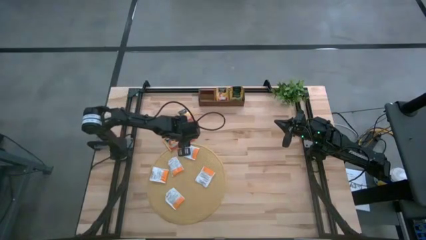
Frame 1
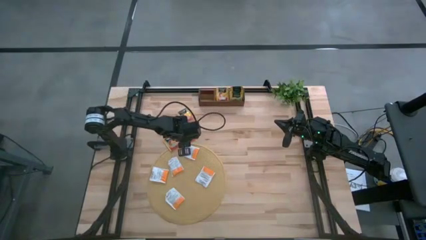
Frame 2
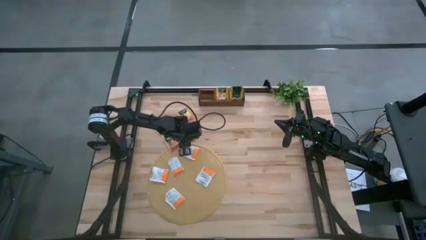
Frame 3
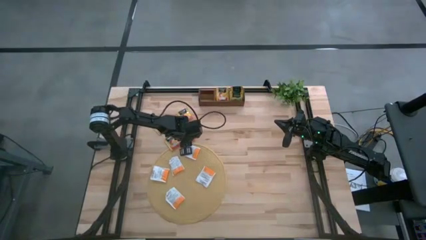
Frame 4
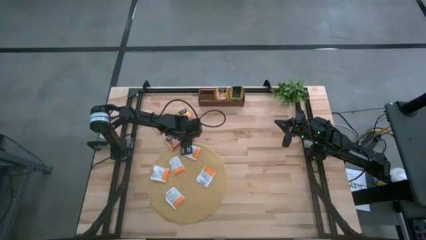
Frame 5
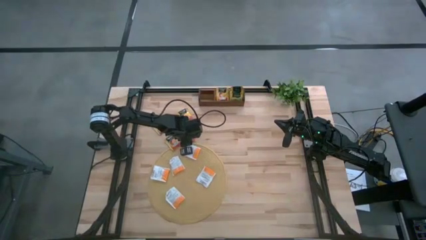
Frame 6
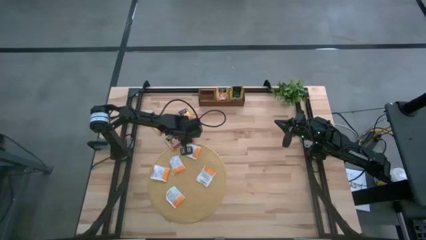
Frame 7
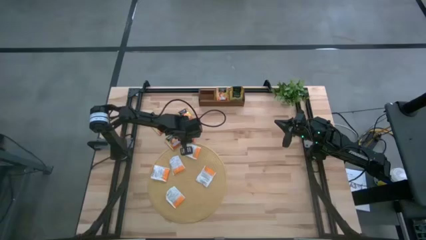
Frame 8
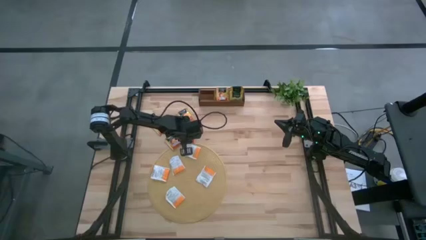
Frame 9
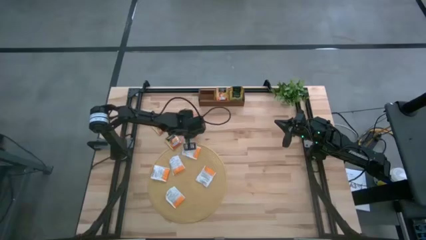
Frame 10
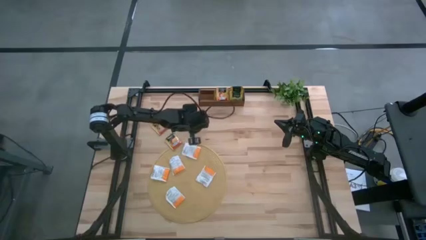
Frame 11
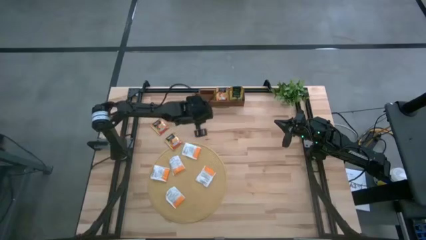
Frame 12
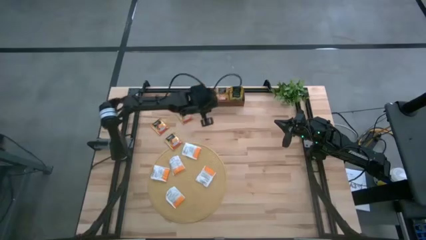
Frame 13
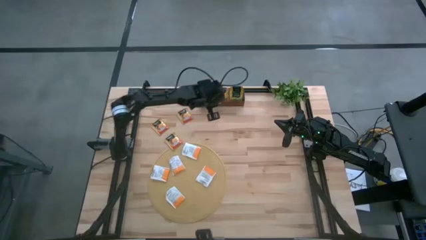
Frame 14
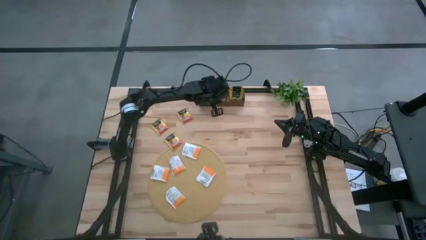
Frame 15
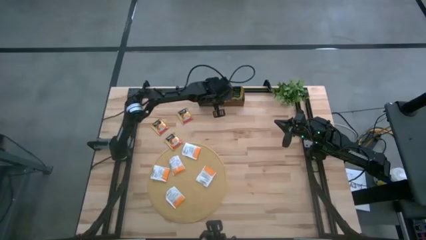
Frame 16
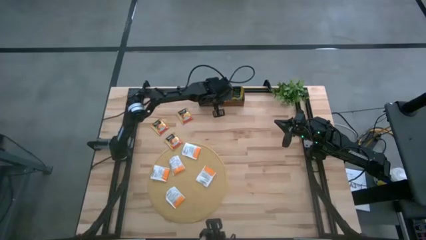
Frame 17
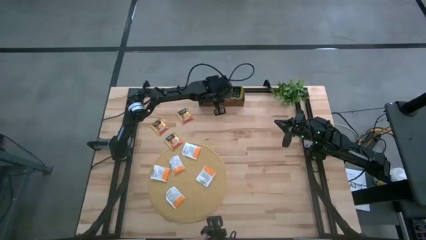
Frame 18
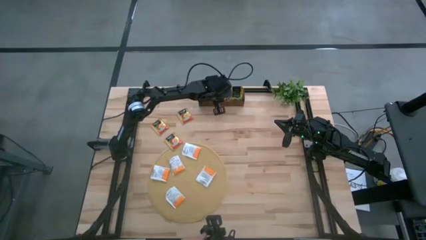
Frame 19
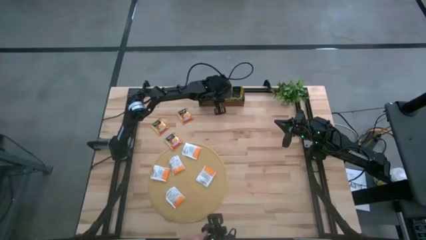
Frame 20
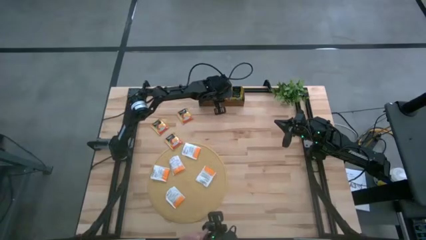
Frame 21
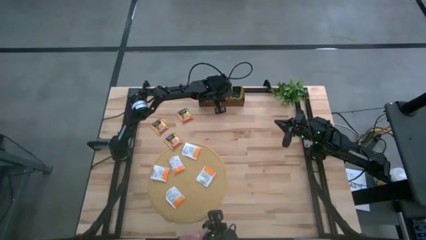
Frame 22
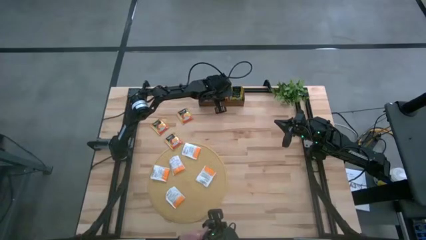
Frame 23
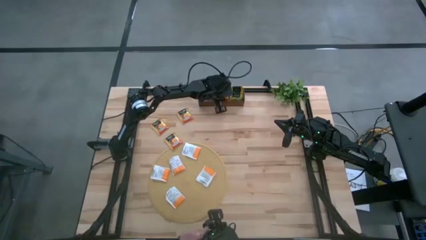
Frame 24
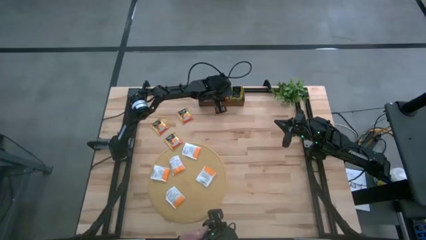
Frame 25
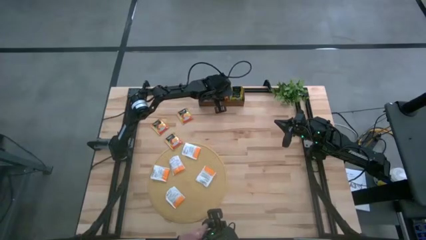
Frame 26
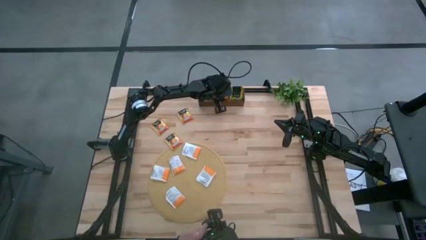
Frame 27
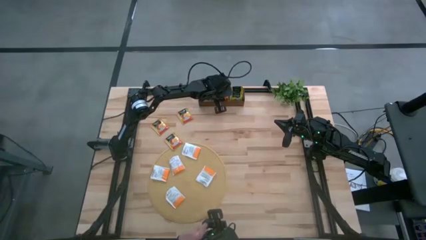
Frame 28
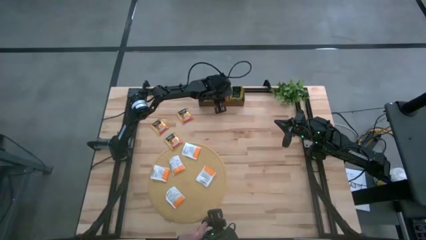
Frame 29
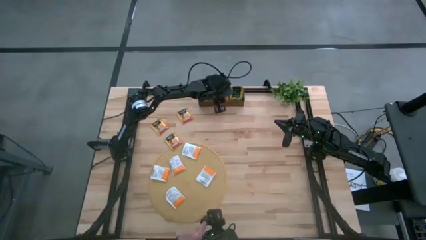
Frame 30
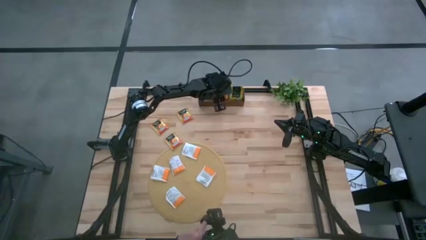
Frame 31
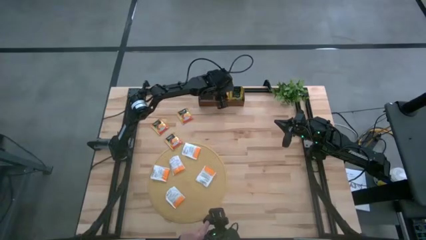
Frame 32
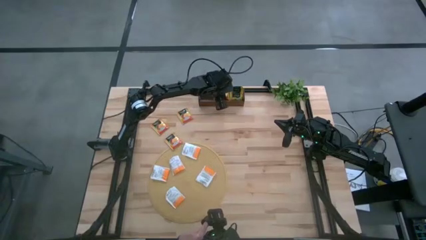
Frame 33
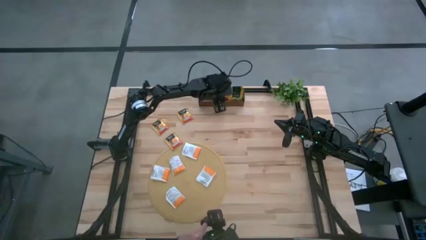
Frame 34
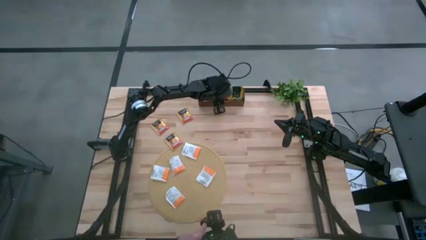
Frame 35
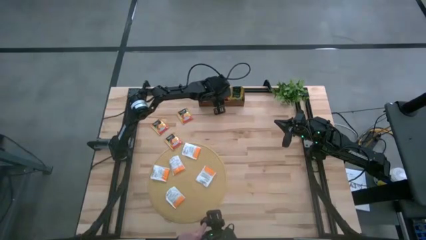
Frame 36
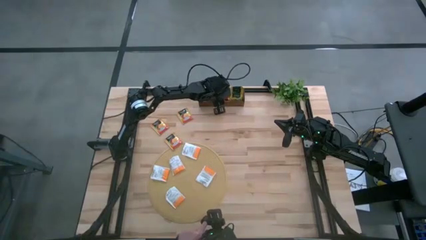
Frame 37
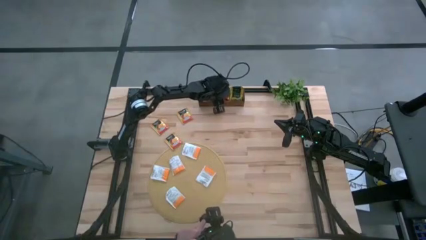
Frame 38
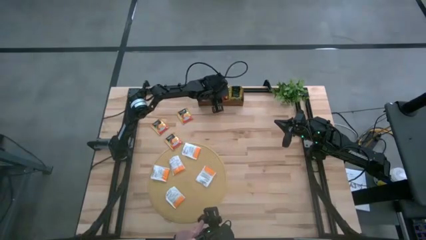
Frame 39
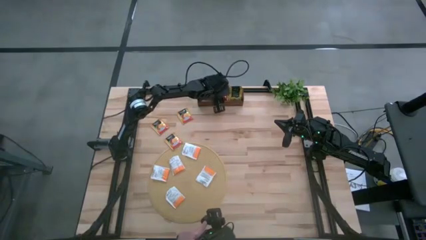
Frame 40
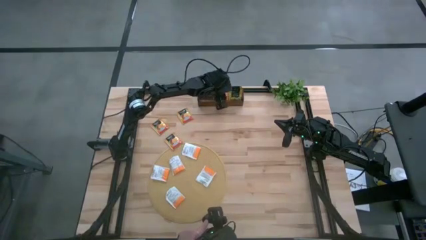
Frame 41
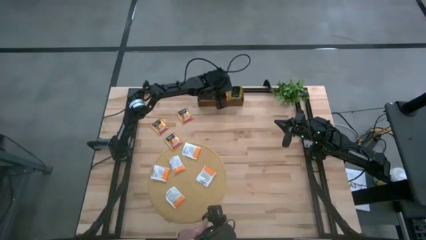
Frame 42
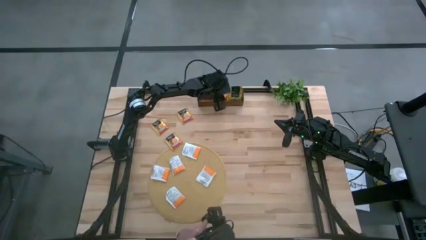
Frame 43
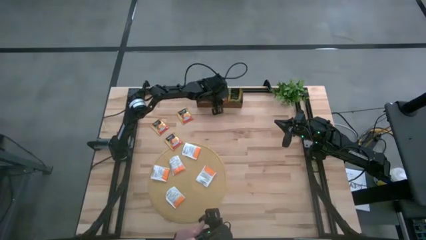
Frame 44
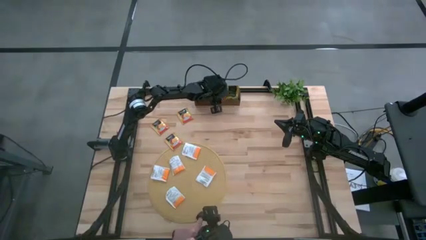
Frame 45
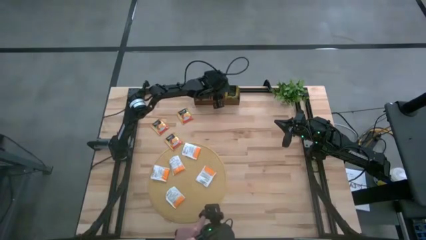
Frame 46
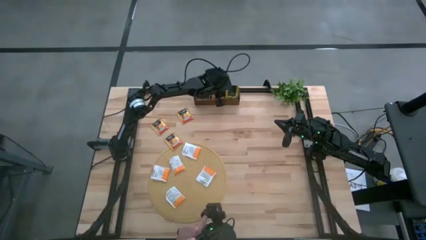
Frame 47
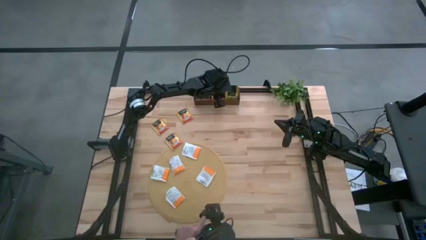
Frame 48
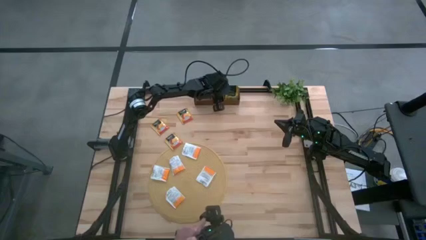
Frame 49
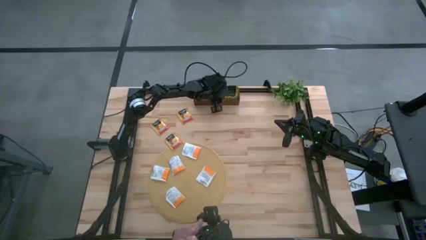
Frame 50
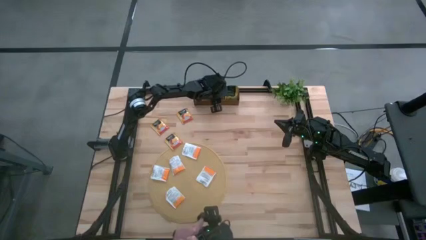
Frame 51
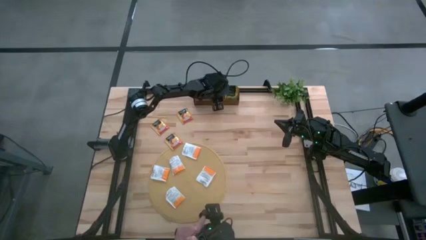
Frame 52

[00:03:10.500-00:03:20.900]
Task: Pick & Place Tea
Put the yellow tea bag into the middle slot of the wooden organizer

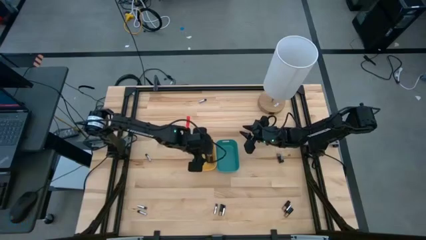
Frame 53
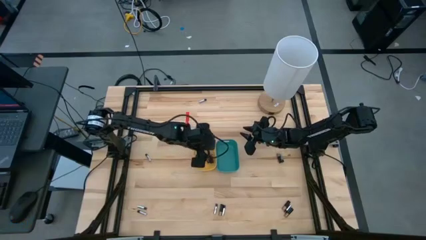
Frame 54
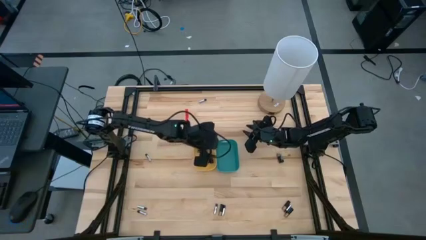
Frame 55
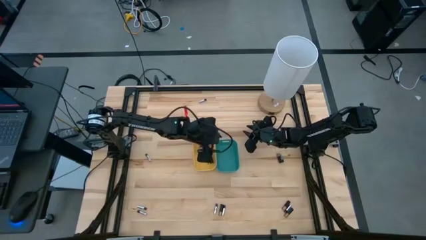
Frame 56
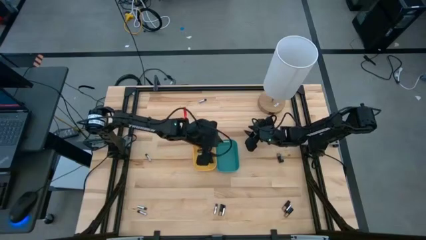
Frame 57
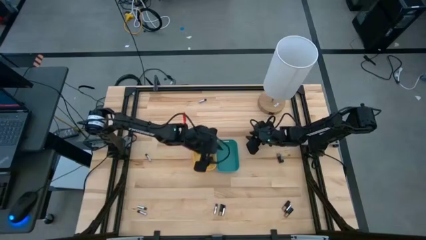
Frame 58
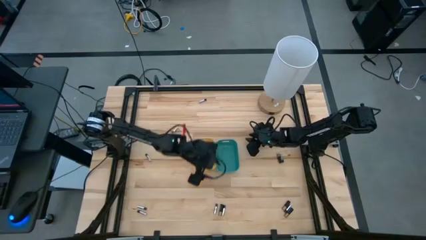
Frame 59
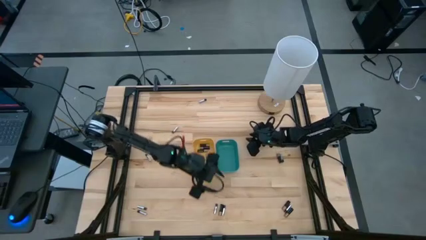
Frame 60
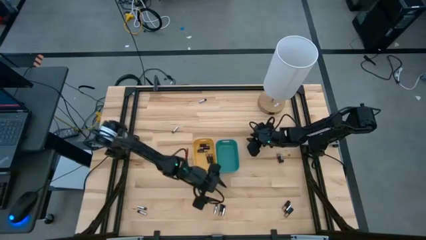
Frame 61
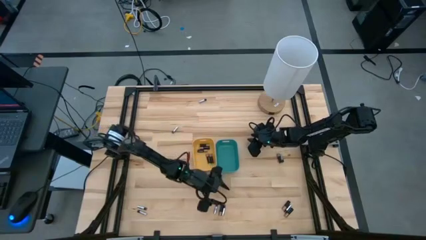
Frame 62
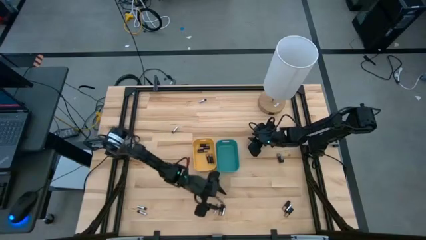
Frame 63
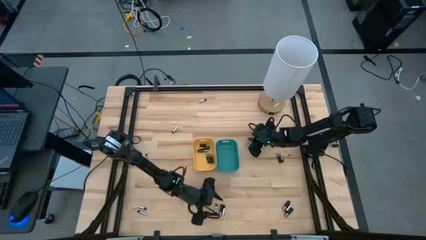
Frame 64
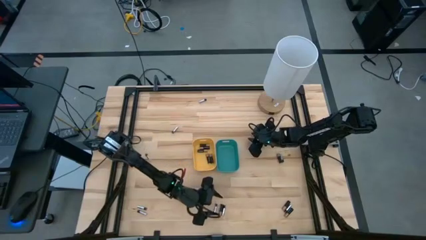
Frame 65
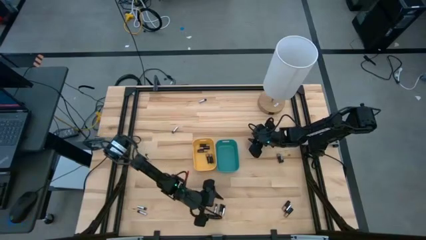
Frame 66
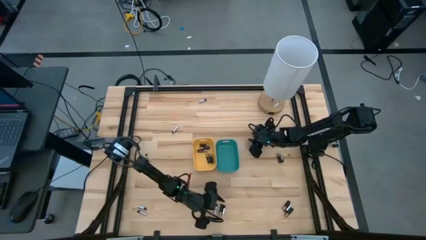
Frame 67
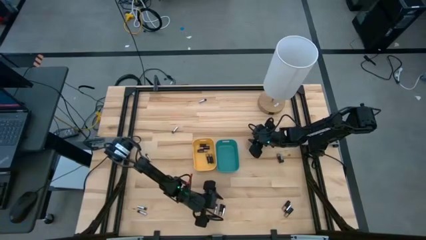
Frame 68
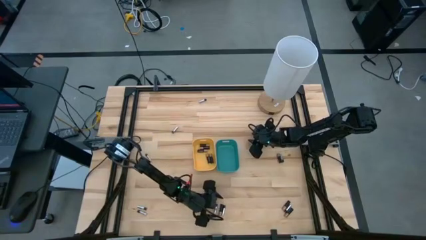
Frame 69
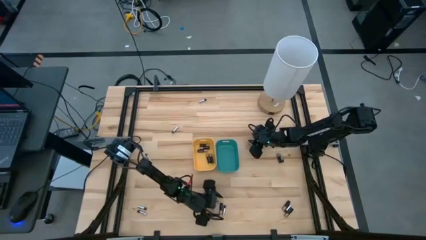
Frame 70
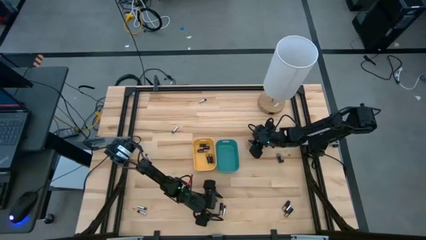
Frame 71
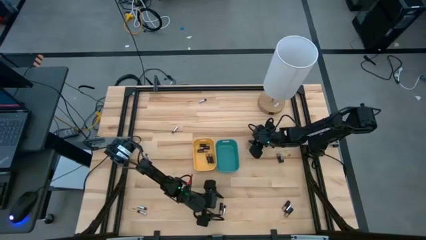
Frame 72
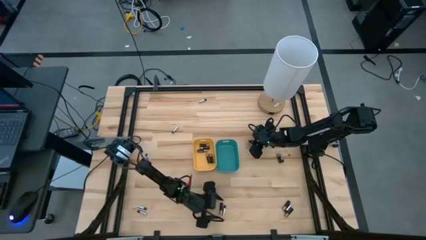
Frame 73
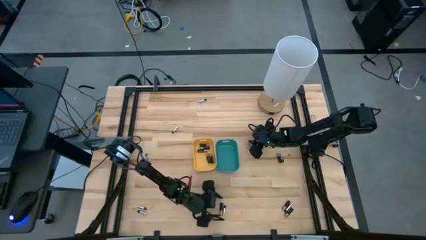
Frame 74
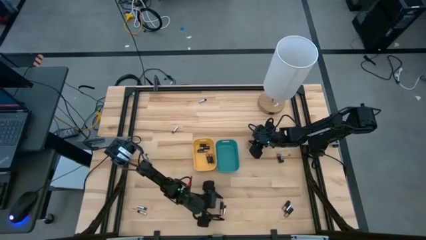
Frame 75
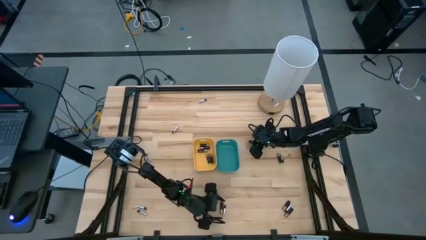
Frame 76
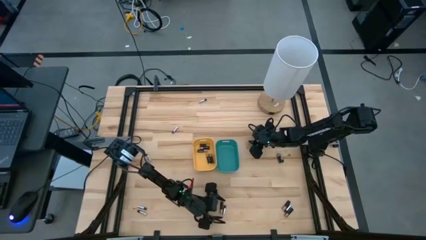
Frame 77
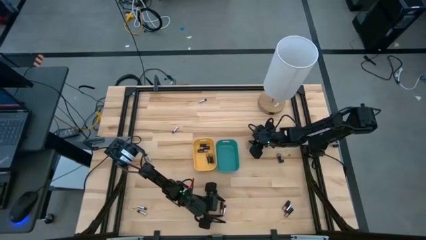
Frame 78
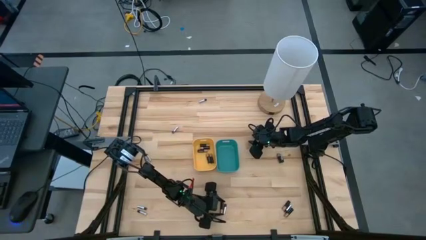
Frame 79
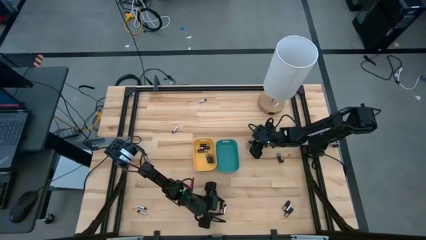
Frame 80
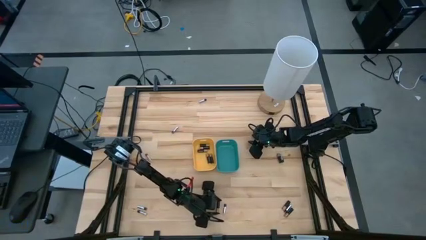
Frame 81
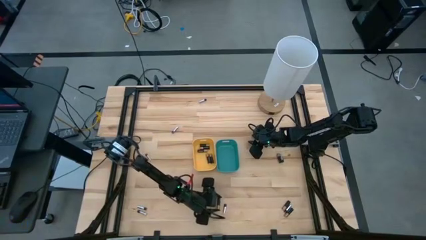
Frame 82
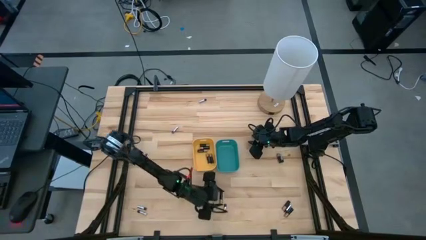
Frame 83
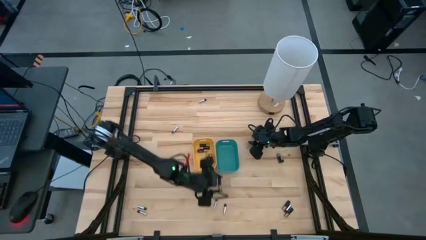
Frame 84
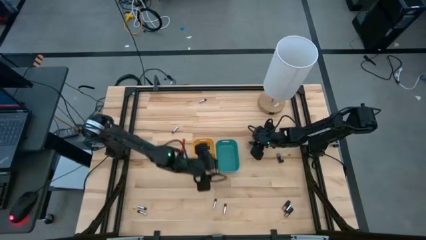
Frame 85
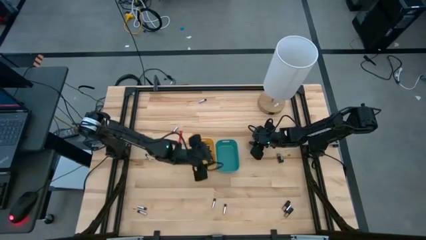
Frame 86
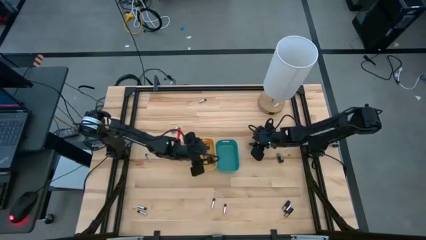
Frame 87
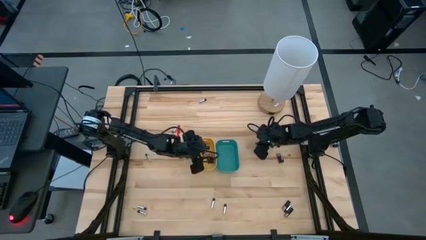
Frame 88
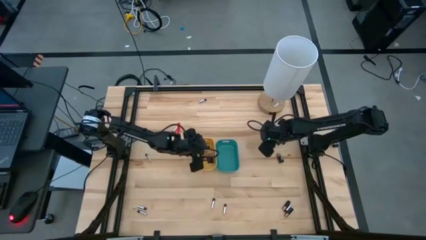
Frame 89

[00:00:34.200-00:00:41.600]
Task: Sort batteries
Put the black battery into the yellow bin
